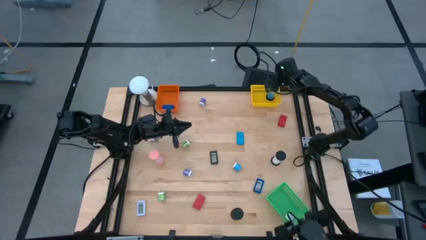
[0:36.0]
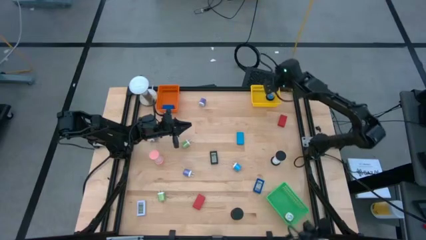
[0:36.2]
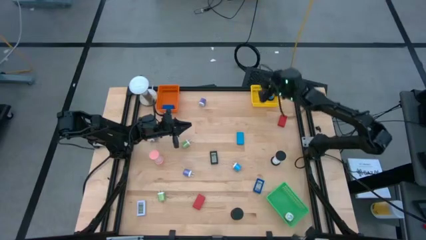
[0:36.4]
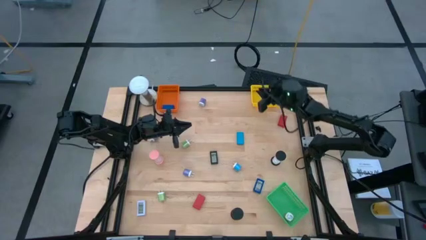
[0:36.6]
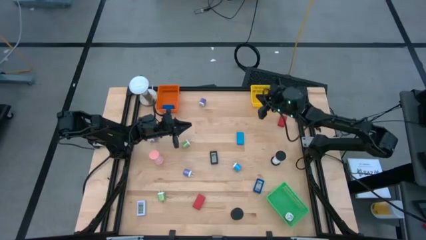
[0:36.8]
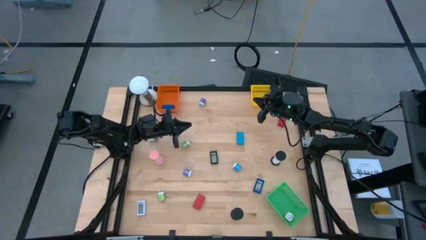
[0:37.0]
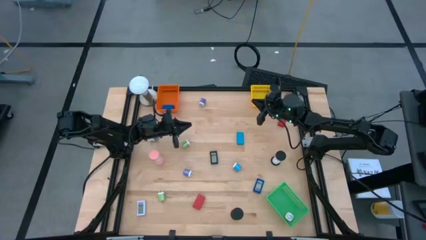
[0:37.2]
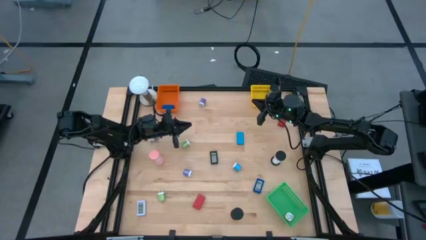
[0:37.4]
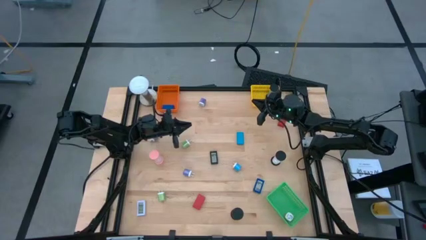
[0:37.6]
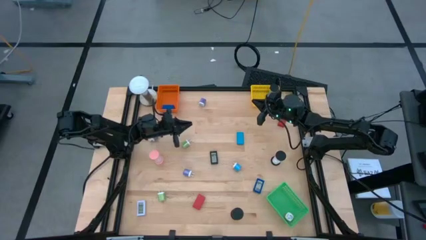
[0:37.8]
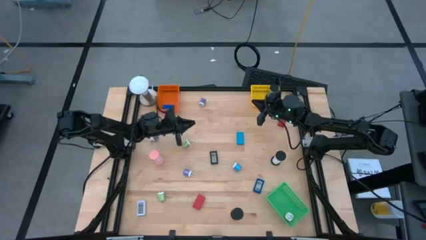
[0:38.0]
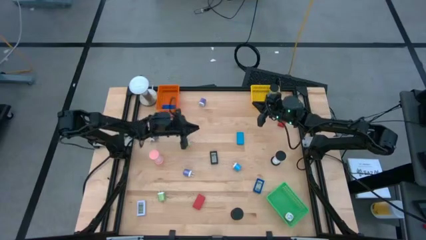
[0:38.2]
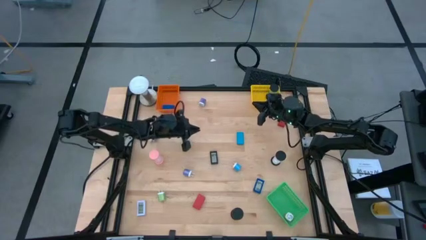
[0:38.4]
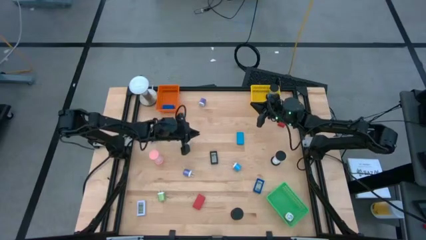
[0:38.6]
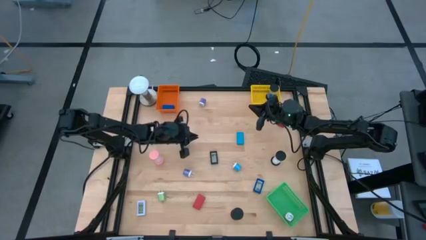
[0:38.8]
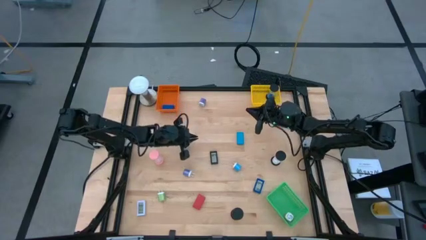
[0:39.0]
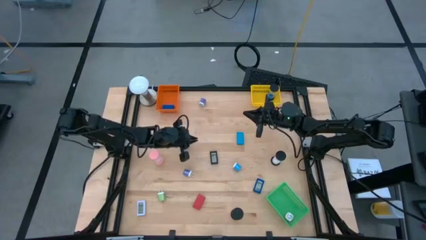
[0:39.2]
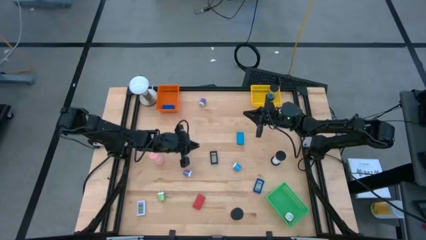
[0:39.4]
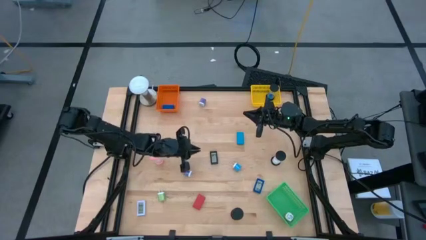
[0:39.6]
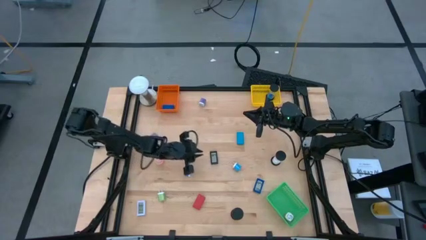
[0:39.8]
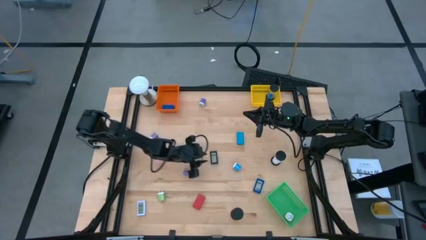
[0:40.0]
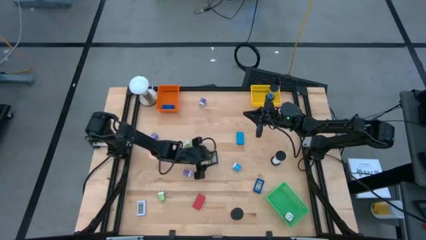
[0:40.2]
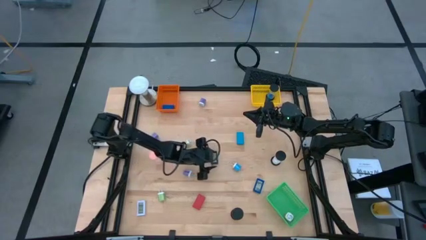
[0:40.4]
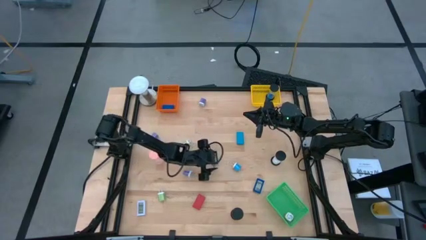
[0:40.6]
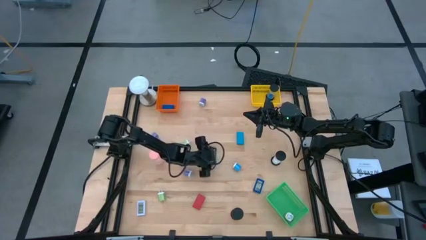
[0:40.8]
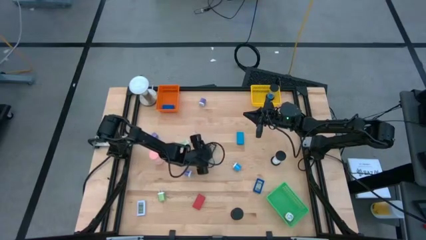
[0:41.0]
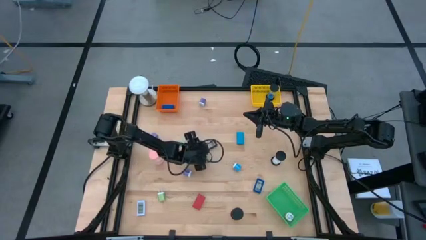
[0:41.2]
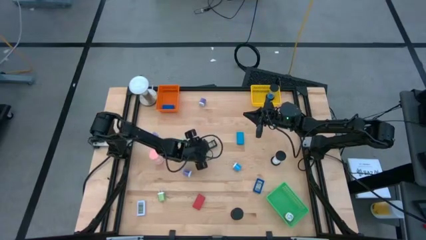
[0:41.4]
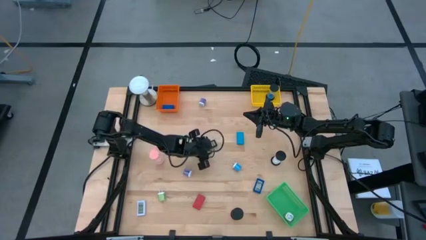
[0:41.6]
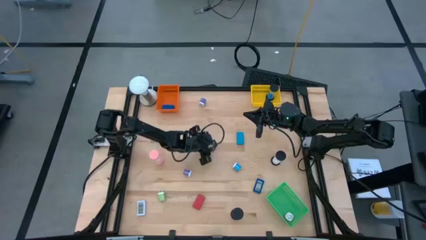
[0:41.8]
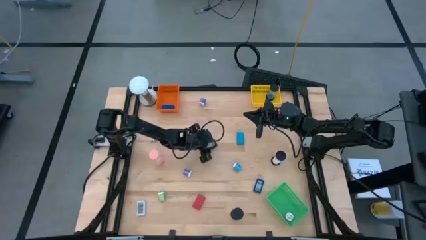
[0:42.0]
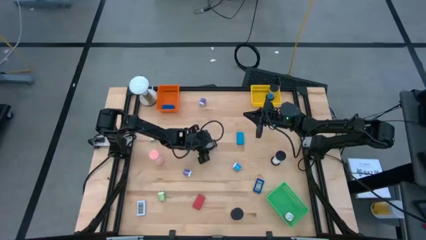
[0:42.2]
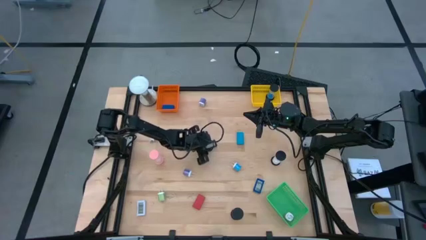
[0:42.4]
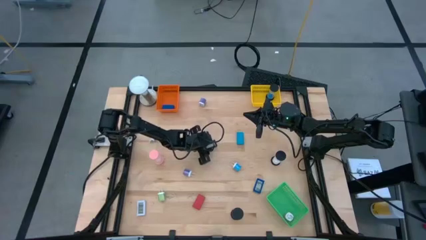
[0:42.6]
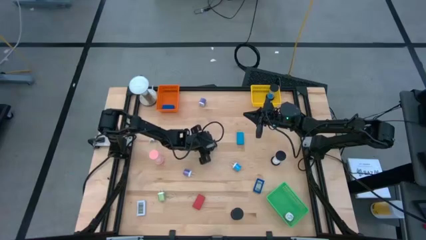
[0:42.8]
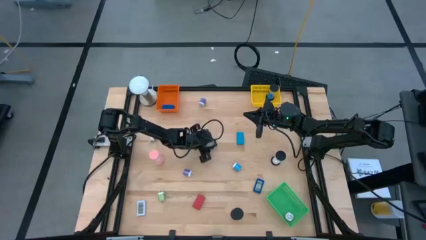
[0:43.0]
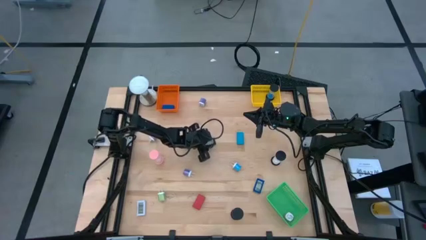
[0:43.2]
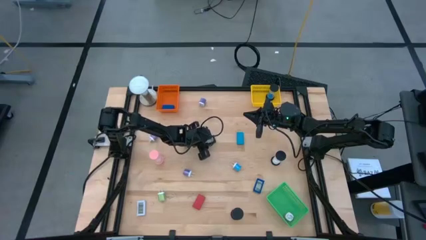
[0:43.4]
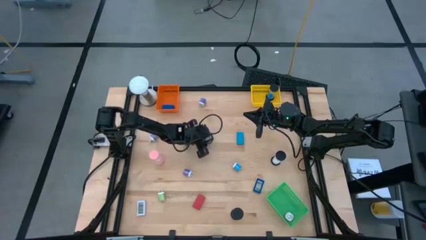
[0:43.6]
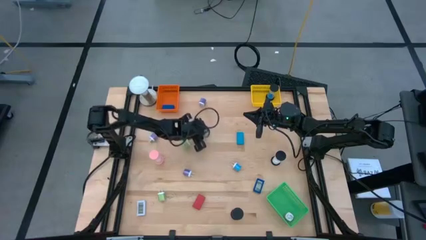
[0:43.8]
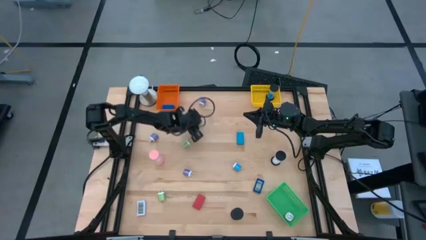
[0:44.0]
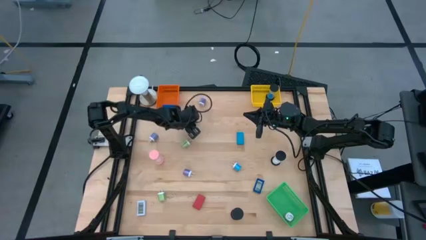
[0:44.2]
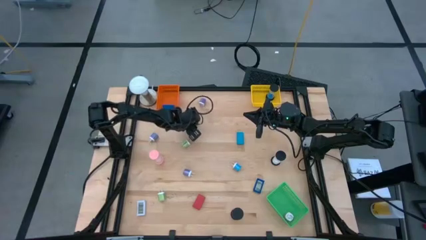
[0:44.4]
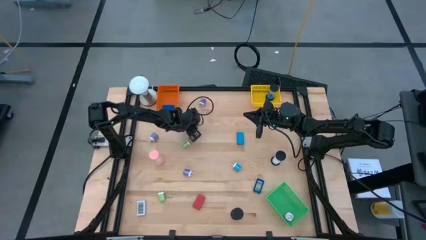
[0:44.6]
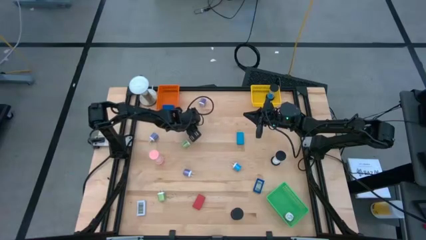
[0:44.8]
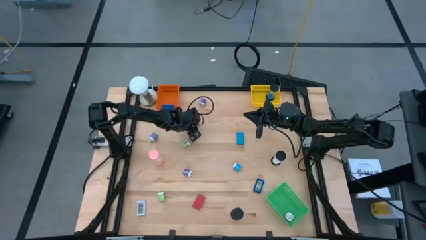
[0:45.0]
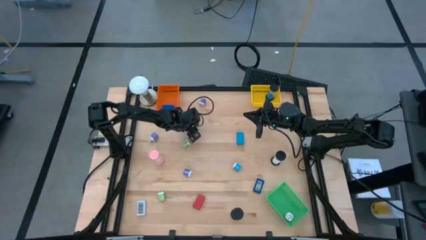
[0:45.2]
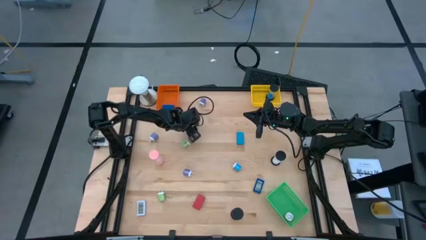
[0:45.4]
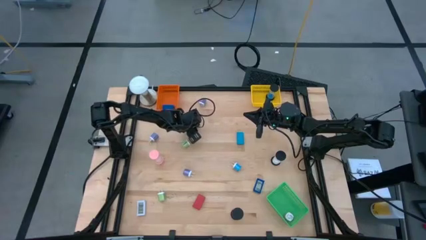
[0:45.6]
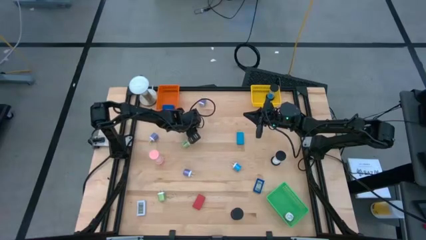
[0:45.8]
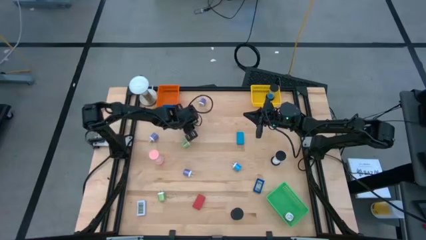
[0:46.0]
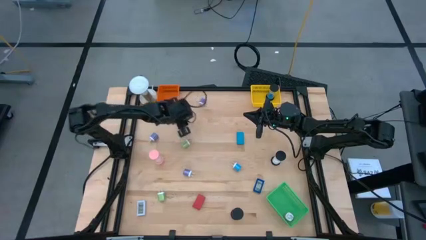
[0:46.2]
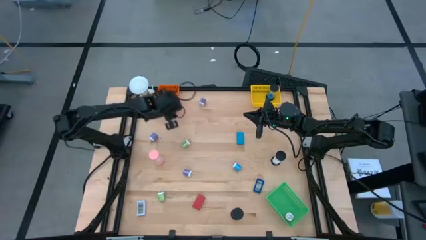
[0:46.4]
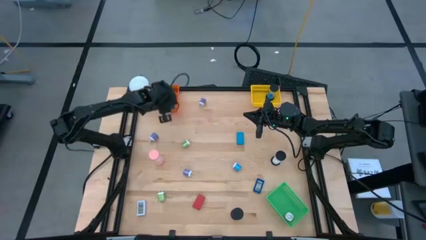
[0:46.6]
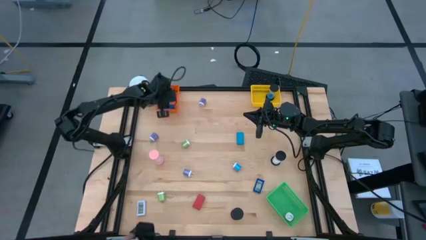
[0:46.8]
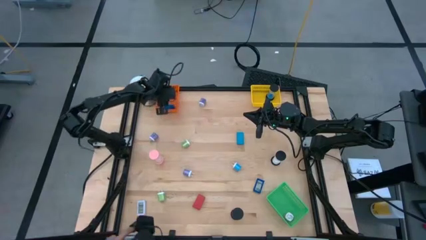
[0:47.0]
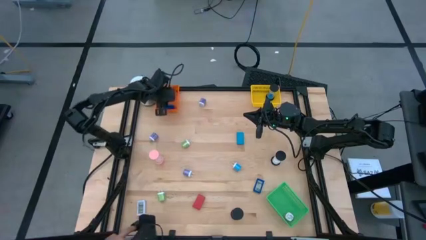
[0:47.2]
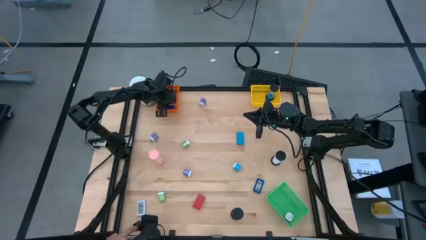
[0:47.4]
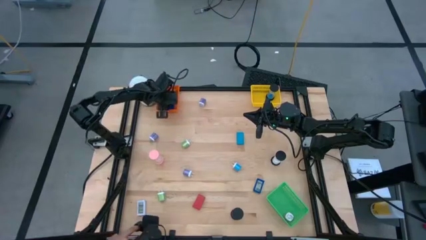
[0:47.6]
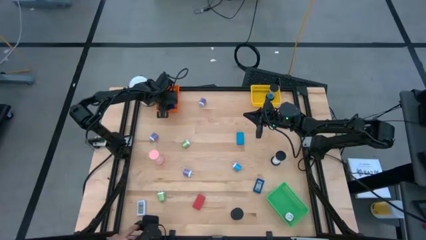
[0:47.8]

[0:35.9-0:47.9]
Task: Pick & Place Office items
Put the black digital clock into the orange bin

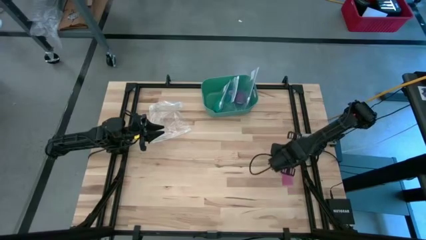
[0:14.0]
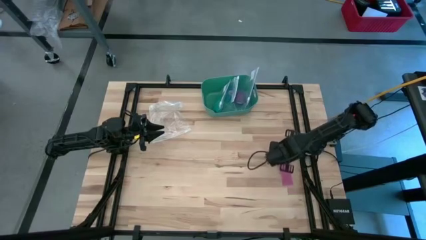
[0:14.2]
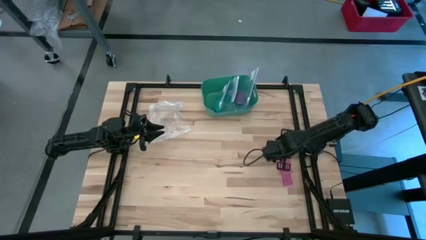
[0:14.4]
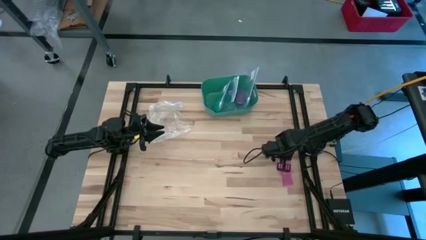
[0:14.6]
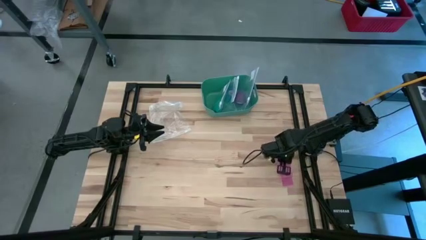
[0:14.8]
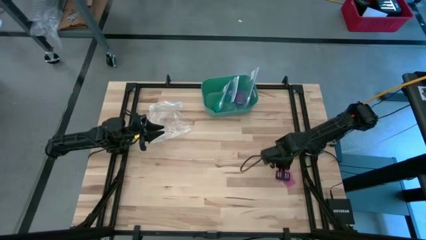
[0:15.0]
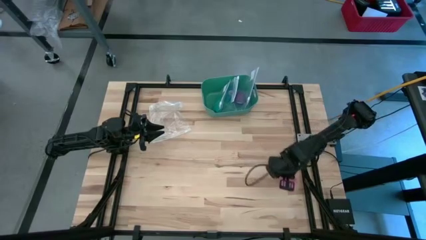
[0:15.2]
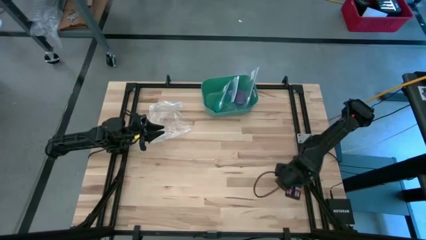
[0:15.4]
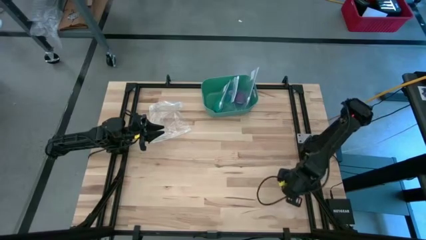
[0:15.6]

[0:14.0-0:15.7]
Task: Roll bandage
Roll the pink bandage
